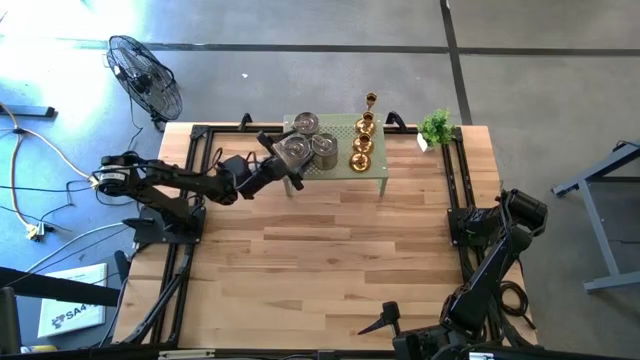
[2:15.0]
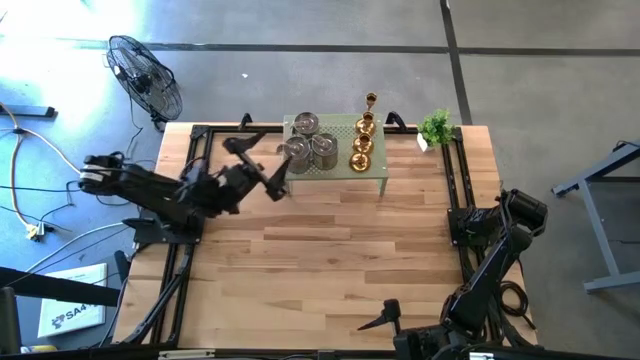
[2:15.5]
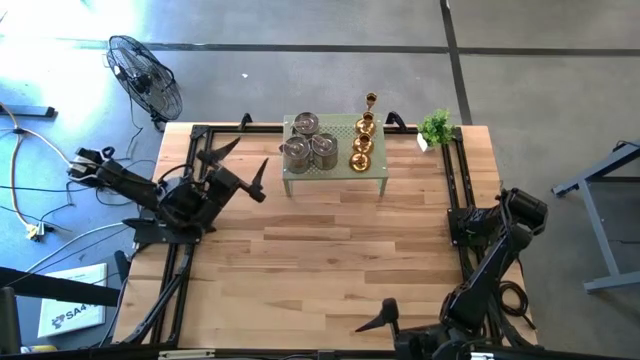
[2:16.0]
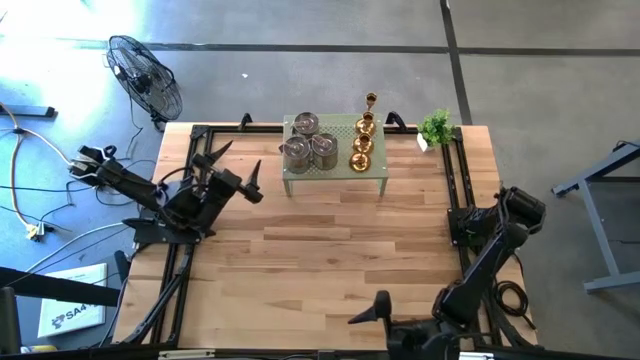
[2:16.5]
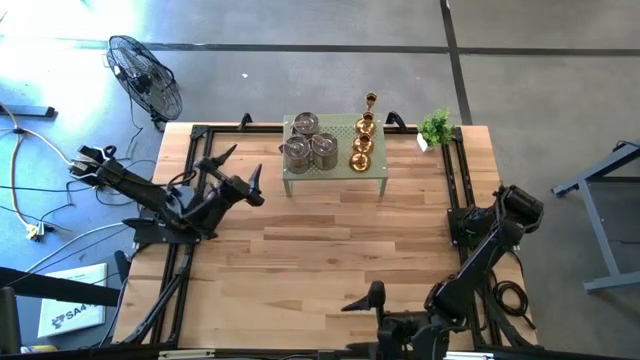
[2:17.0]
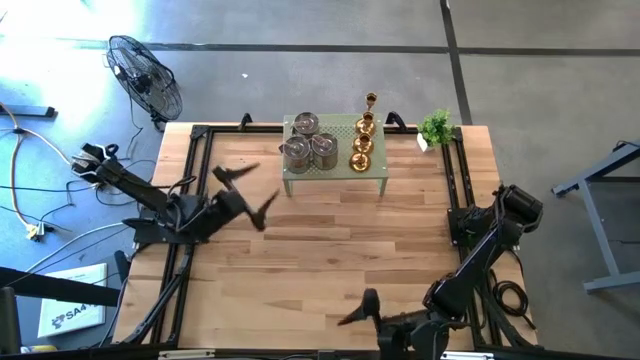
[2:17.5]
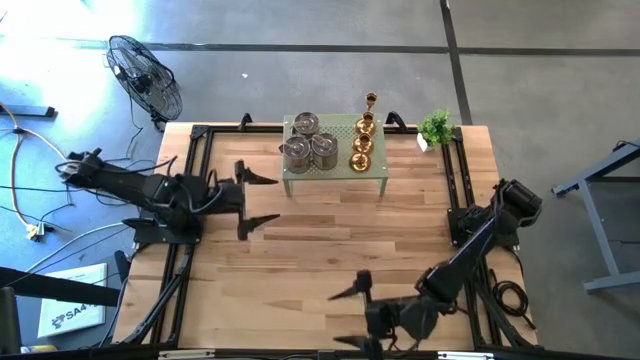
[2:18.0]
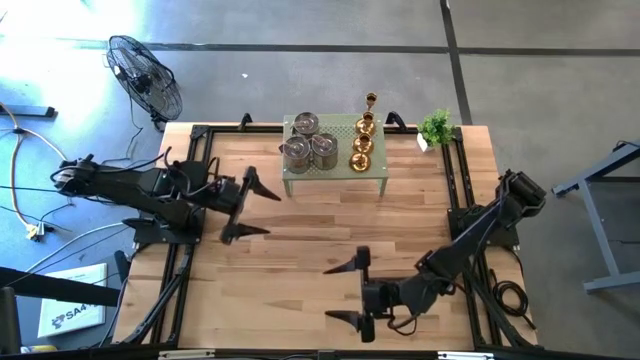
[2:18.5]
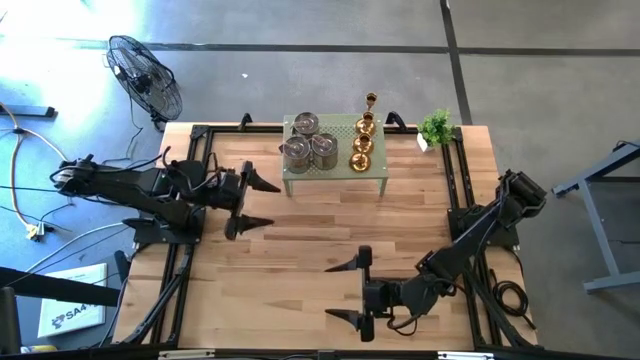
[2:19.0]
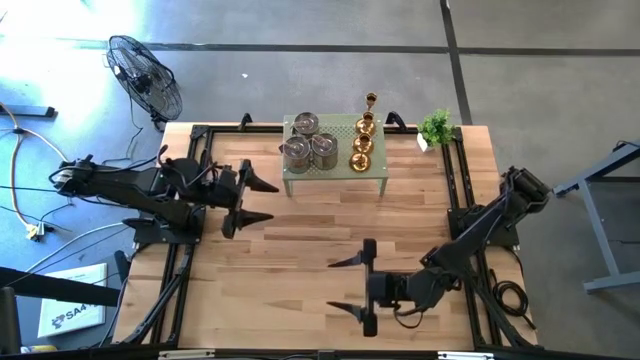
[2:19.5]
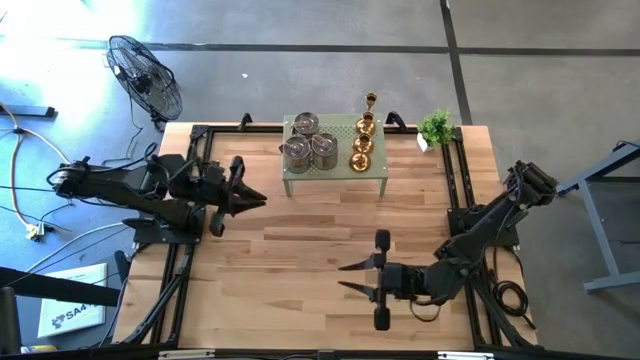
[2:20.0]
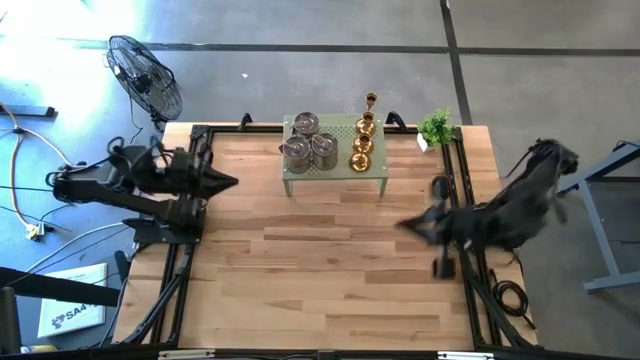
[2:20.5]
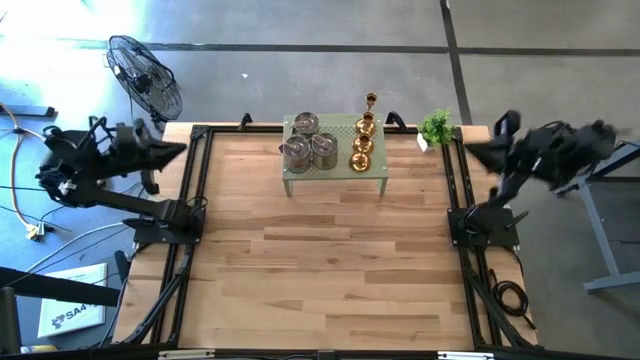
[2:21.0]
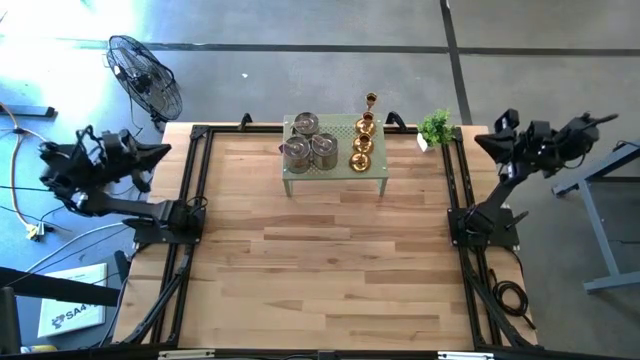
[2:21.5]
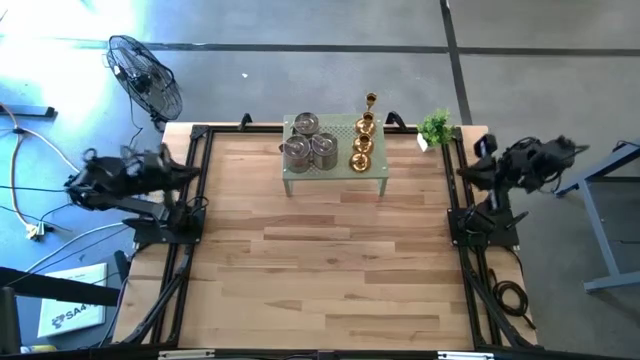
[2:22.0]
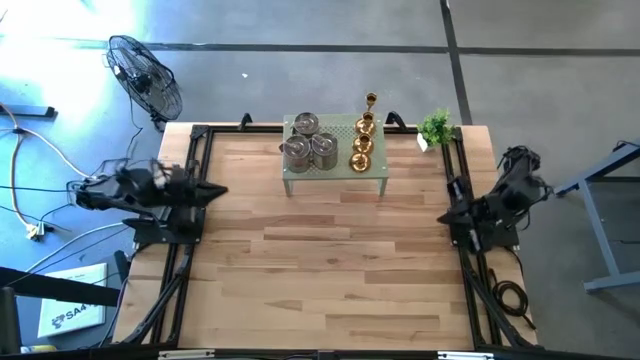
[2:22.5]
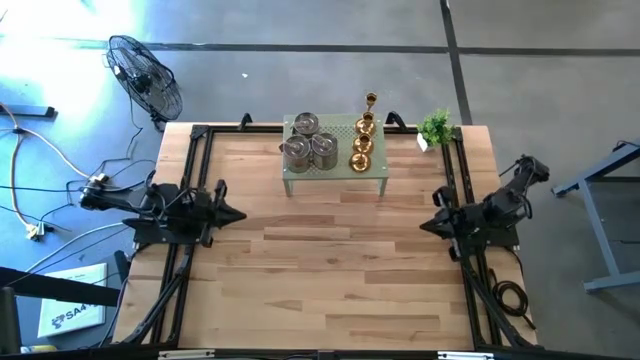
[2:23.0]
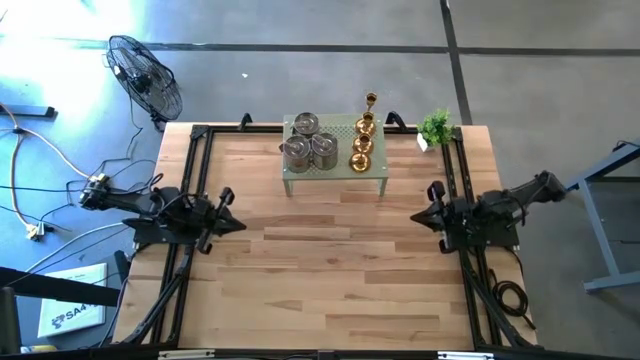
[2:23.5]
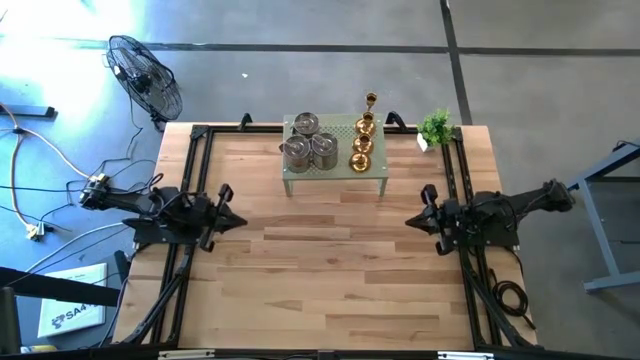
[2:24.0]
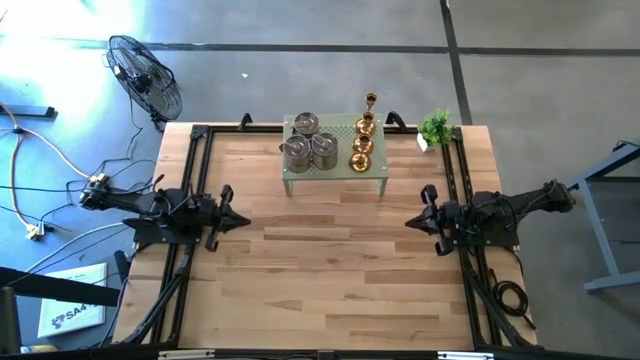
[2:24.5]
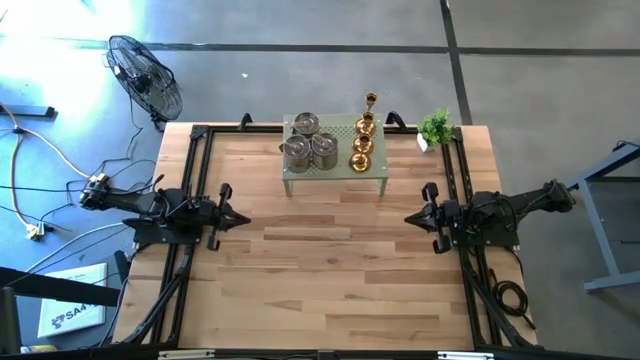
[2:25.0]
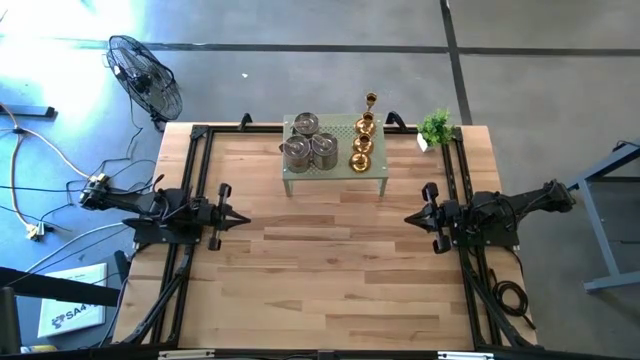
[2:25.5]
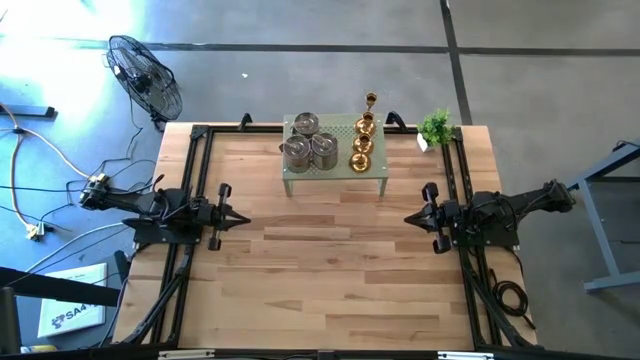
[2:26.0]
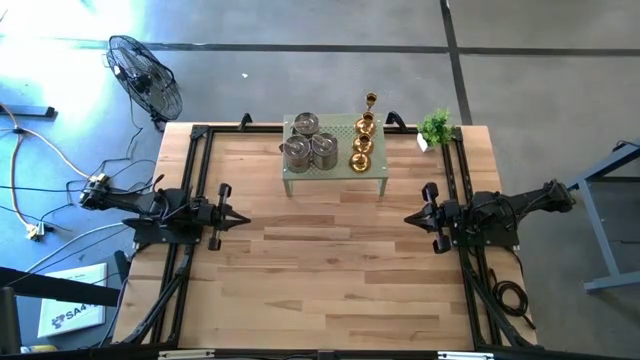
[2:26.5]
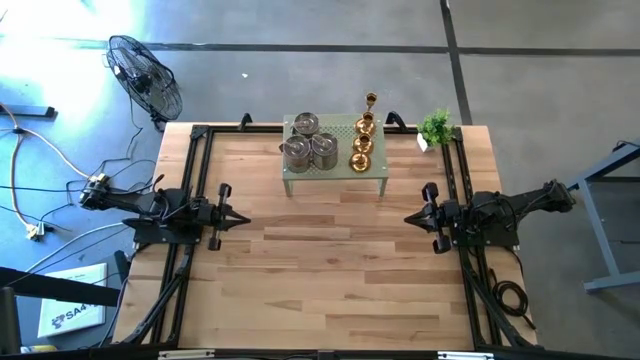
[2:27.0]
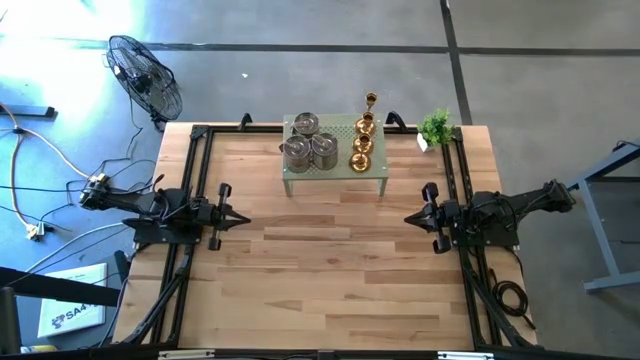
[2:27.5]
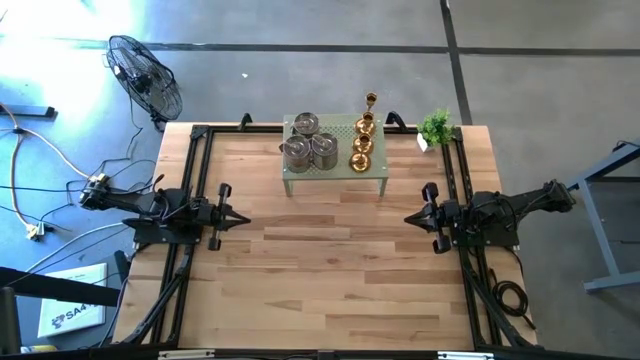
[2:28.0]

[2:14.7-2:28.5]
Task: Pick & Place candle stick holders
Return to Home Position

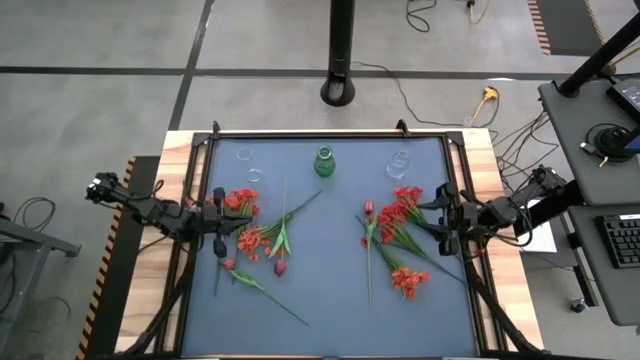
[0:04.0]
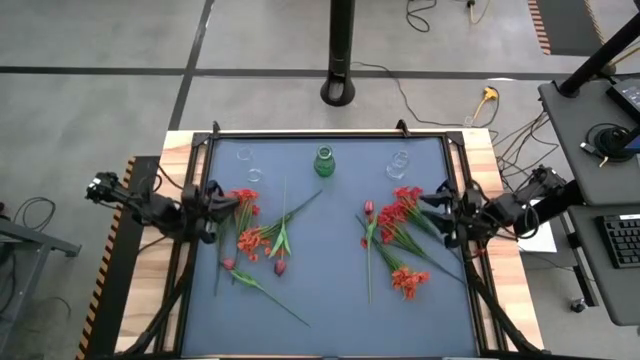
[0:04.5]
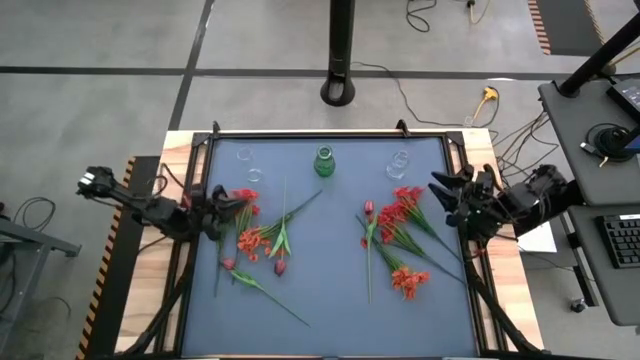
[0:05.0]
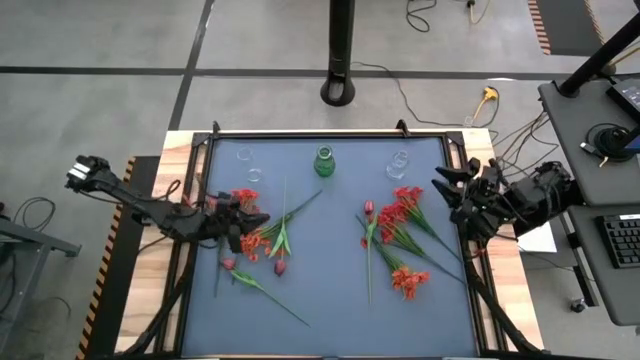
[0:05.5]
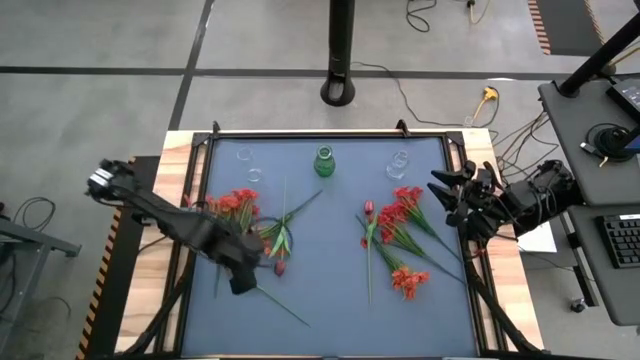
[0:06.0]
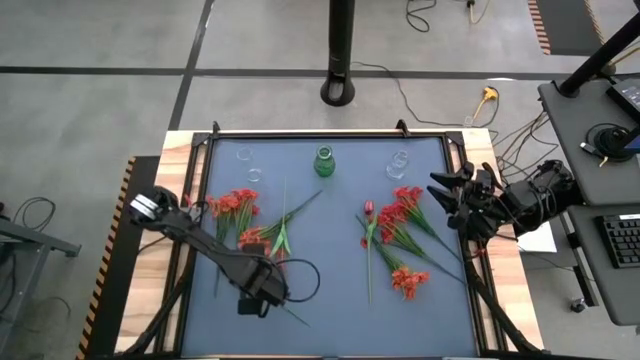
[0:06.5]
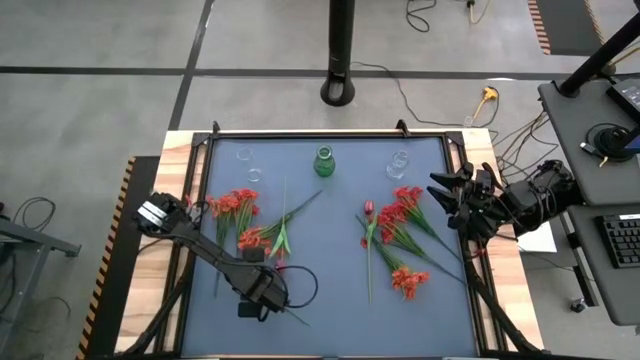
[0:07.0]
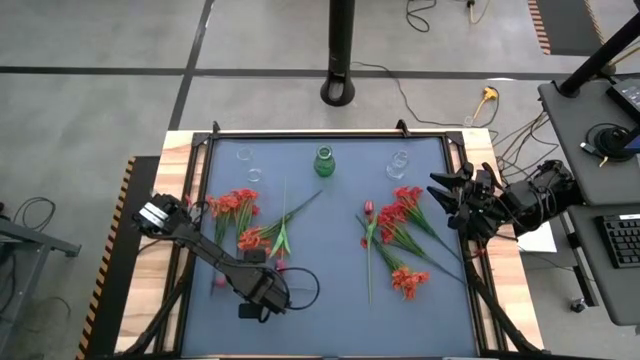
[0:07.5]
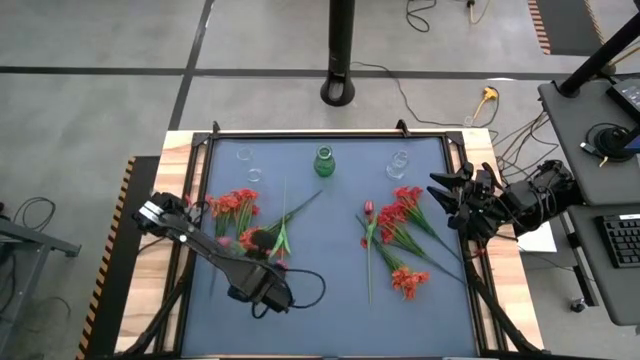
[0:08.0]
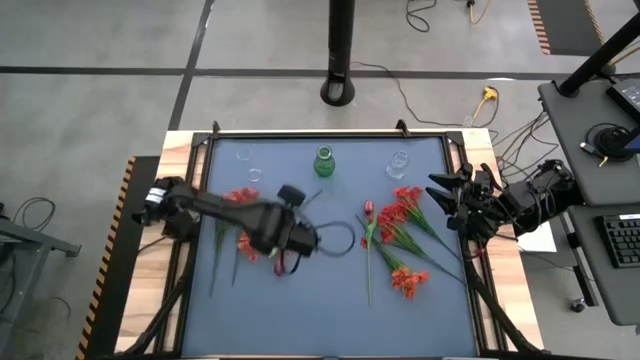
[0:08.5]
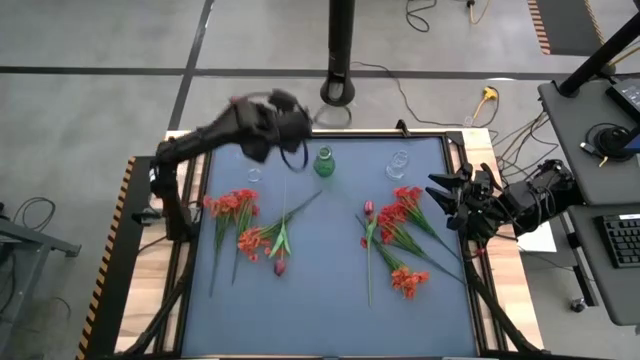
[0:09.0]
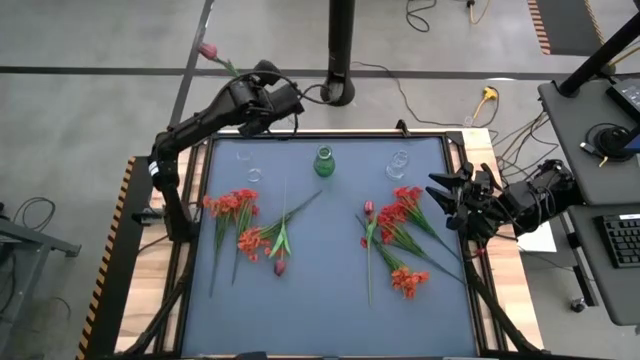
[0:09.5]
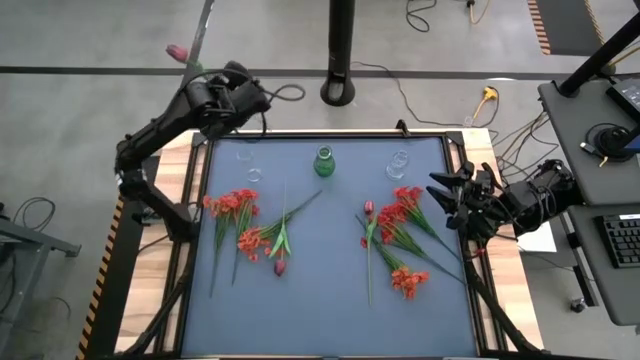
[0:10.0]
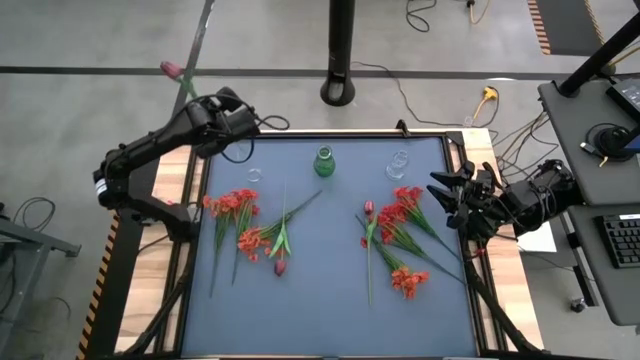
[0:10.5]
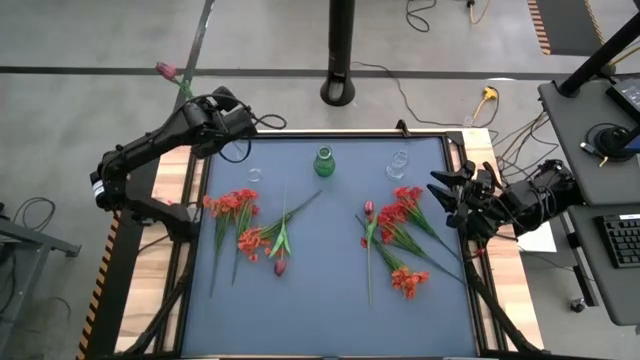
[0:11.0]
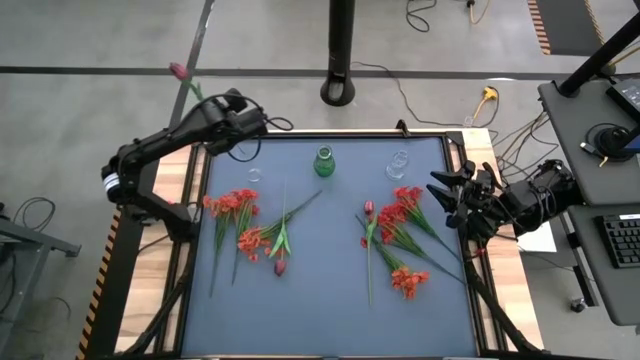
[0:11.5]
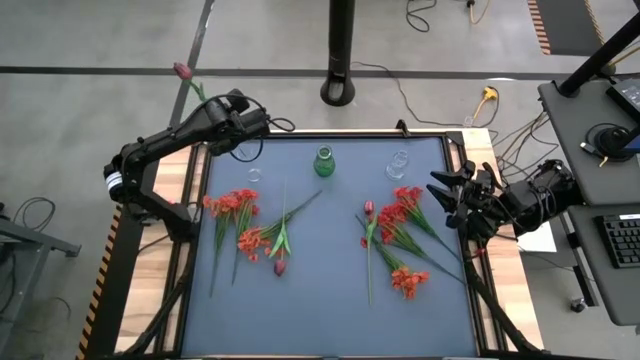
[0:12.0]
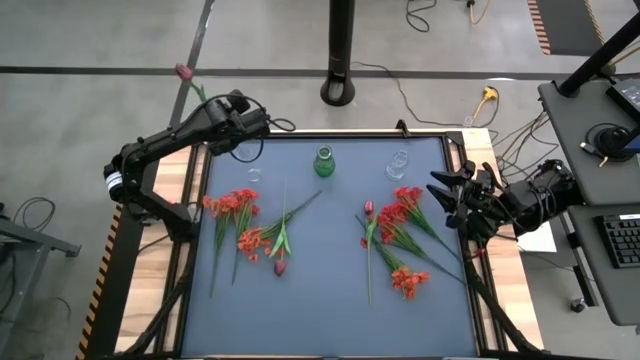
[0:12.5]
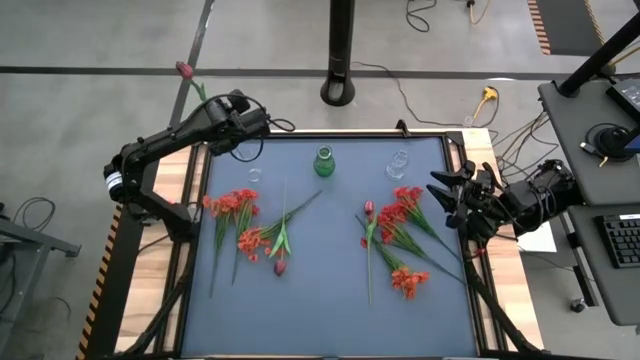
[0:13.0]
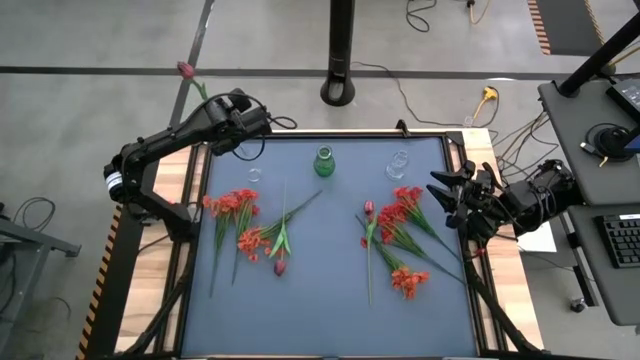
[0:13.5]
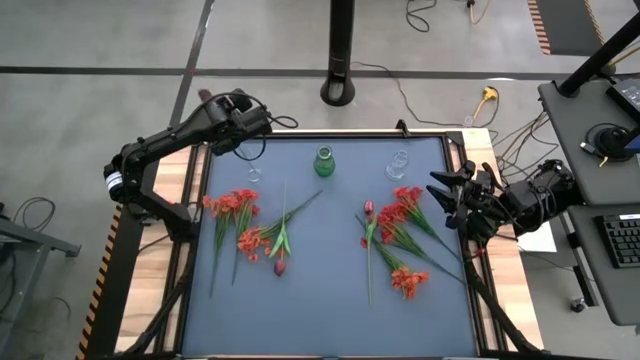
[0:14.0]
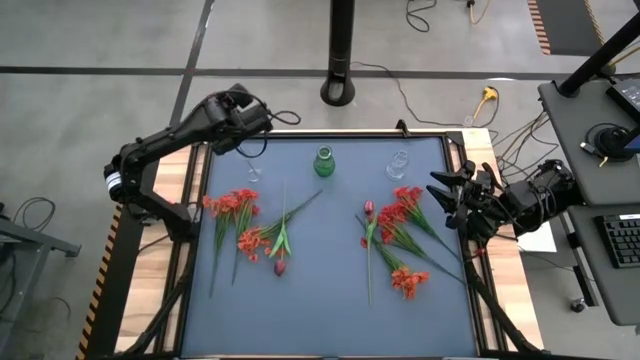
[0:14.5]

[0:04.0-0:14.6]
Task: Sort flowers into vase by color
Put the bottom red tulip into the left transparent vase
